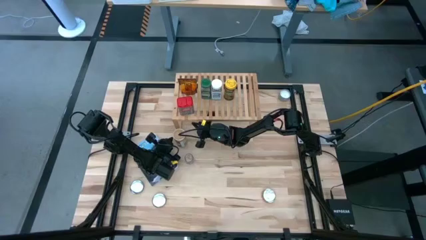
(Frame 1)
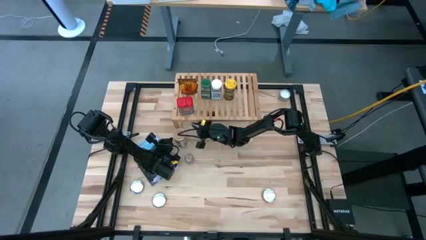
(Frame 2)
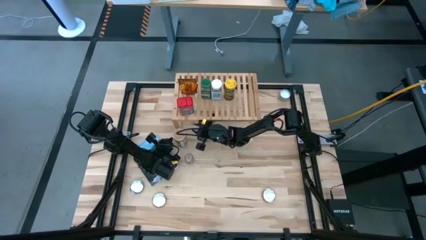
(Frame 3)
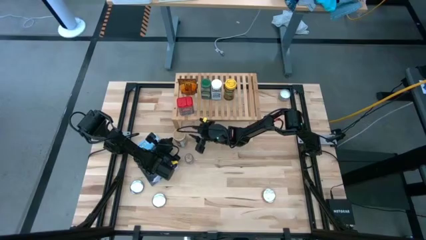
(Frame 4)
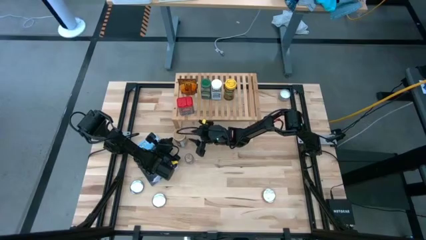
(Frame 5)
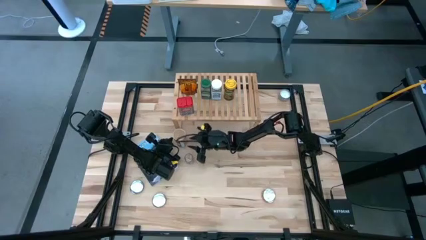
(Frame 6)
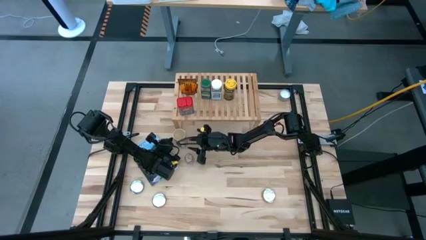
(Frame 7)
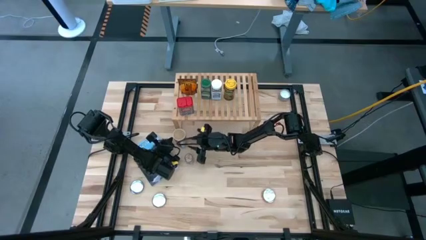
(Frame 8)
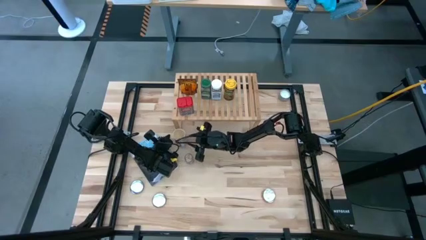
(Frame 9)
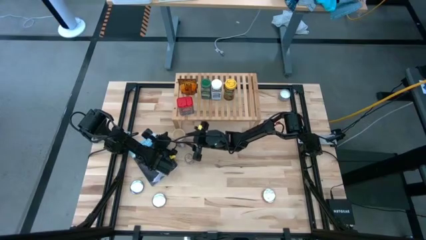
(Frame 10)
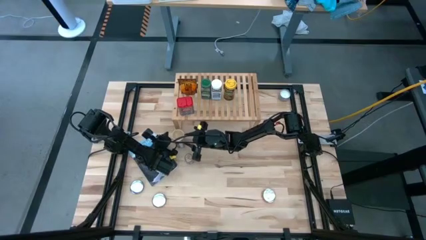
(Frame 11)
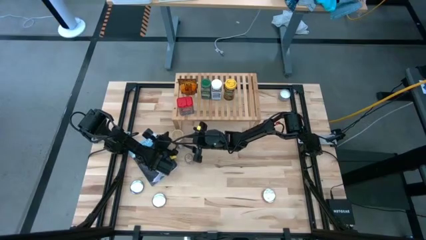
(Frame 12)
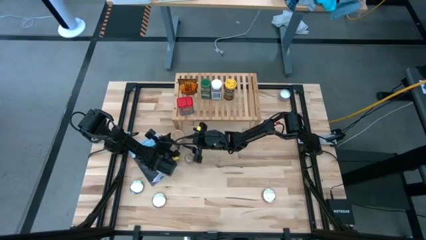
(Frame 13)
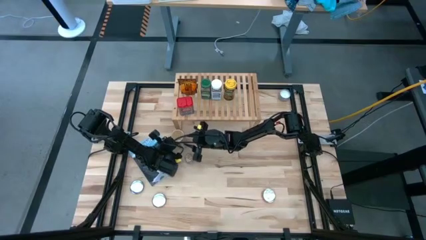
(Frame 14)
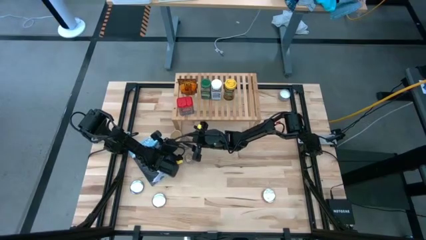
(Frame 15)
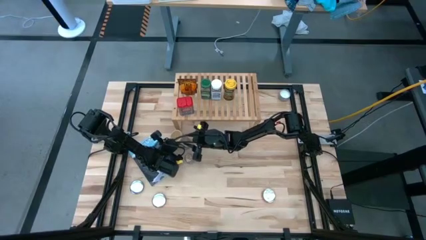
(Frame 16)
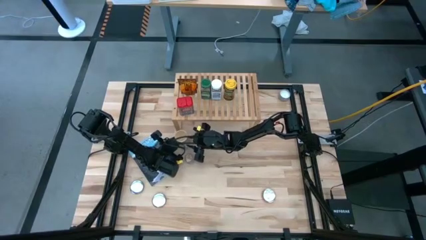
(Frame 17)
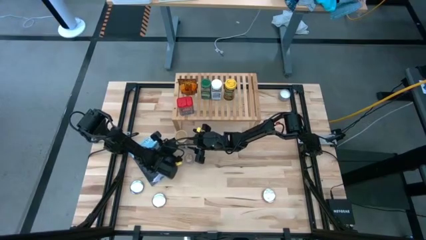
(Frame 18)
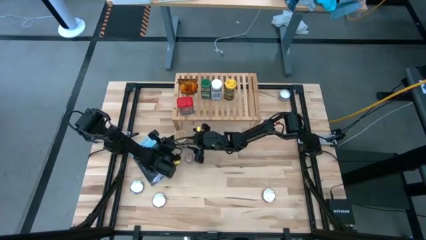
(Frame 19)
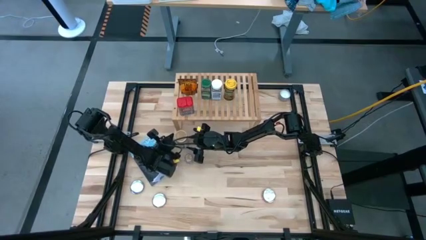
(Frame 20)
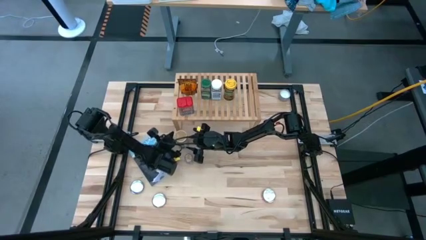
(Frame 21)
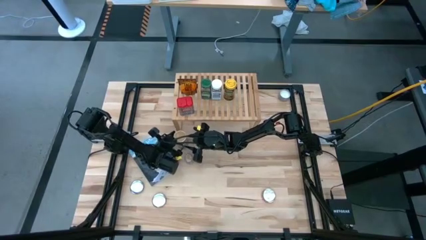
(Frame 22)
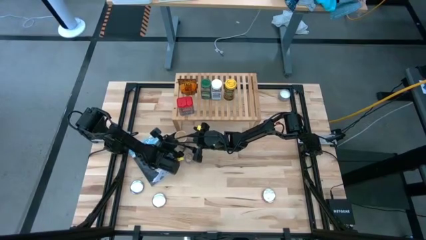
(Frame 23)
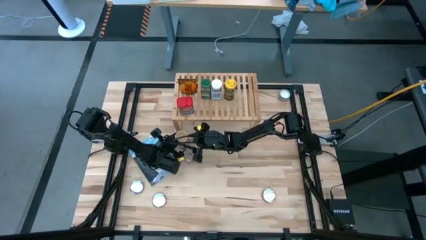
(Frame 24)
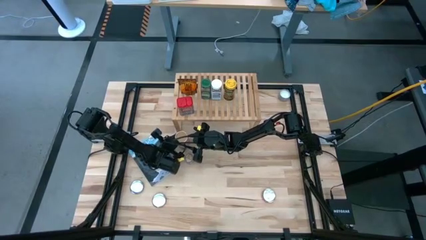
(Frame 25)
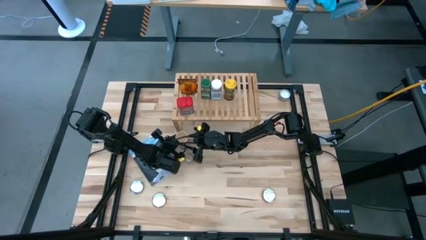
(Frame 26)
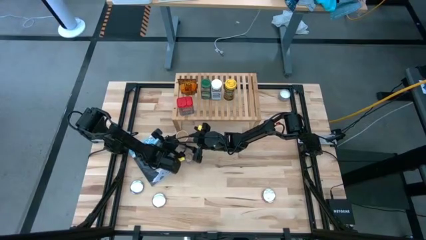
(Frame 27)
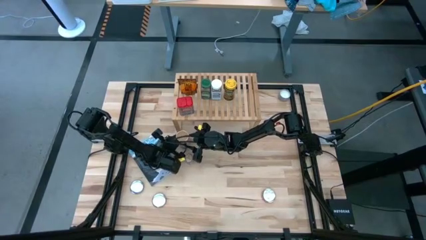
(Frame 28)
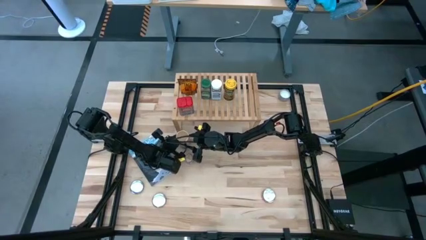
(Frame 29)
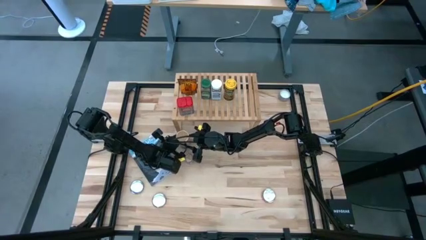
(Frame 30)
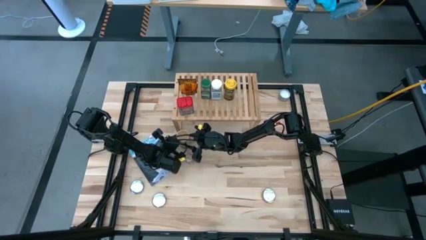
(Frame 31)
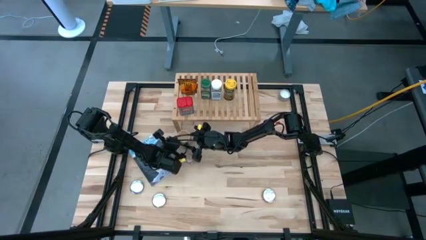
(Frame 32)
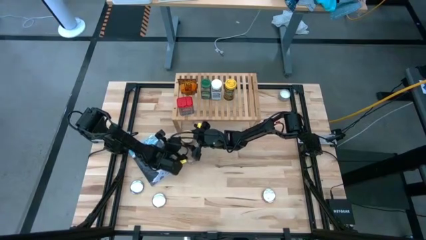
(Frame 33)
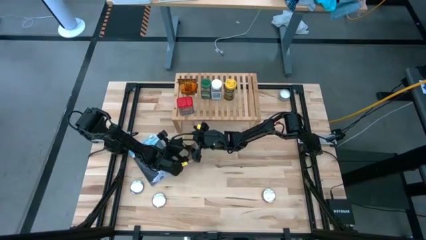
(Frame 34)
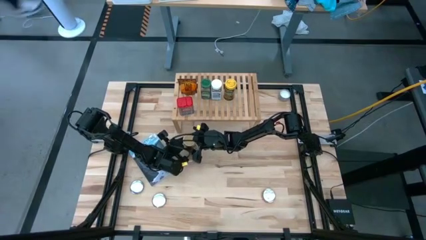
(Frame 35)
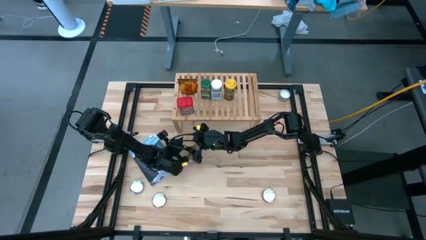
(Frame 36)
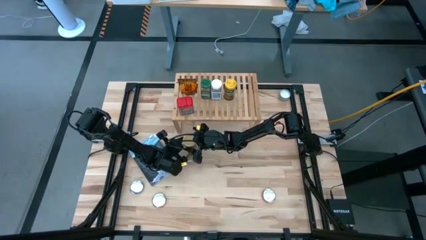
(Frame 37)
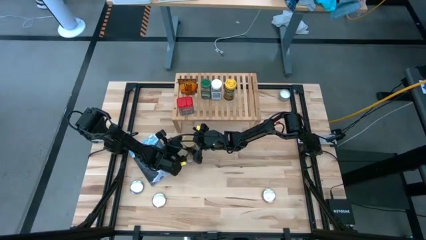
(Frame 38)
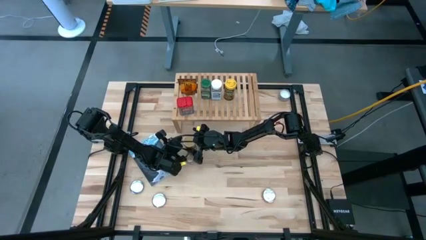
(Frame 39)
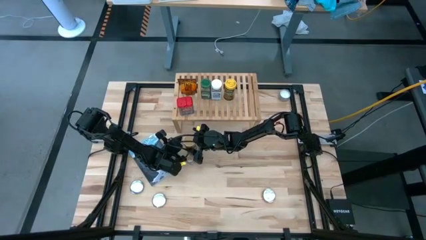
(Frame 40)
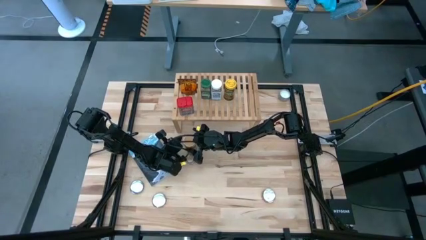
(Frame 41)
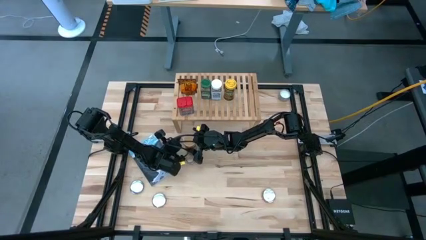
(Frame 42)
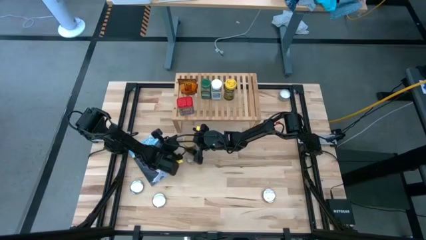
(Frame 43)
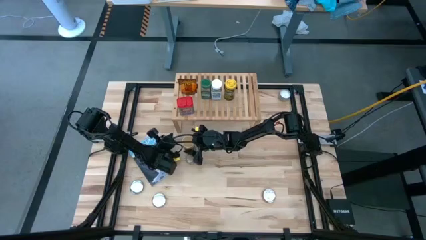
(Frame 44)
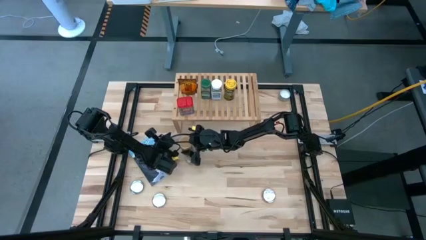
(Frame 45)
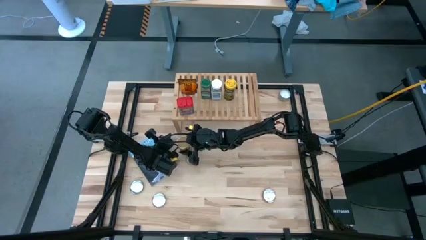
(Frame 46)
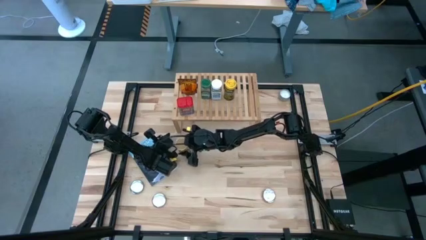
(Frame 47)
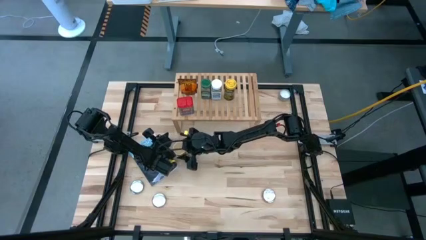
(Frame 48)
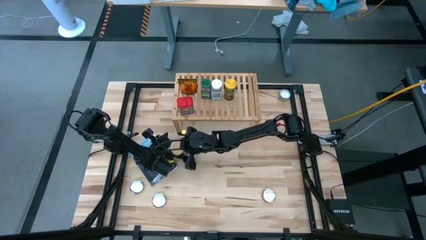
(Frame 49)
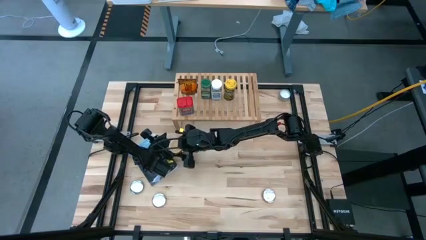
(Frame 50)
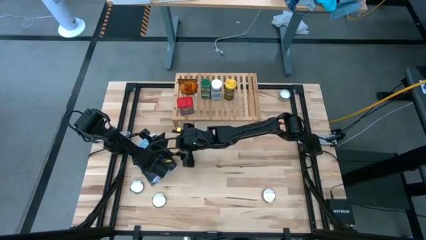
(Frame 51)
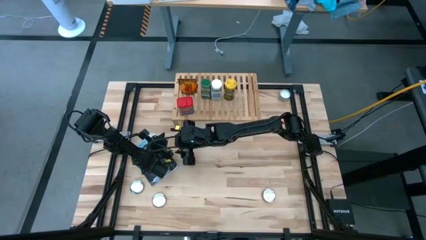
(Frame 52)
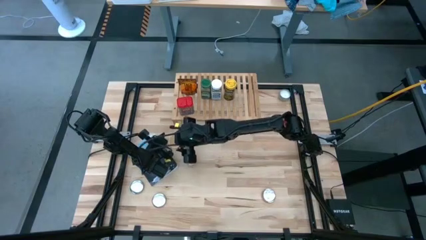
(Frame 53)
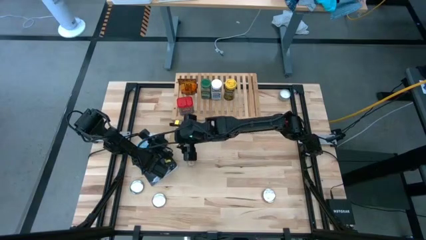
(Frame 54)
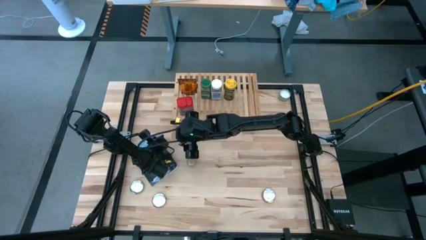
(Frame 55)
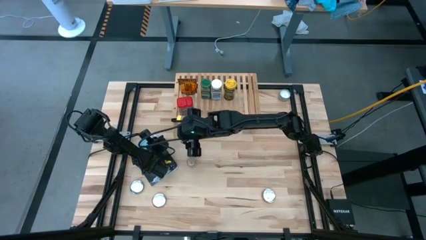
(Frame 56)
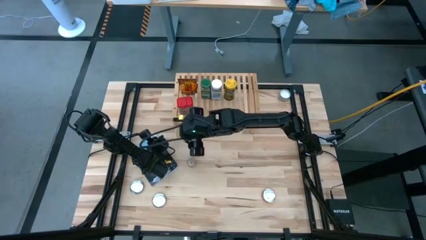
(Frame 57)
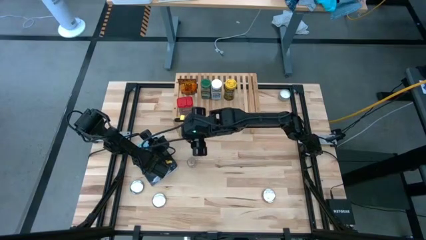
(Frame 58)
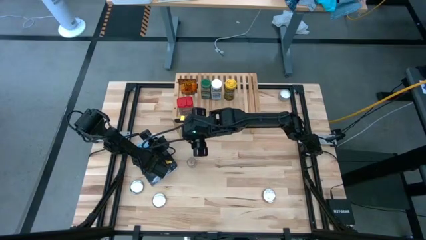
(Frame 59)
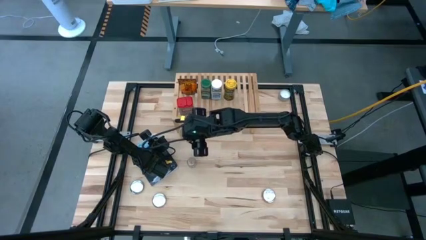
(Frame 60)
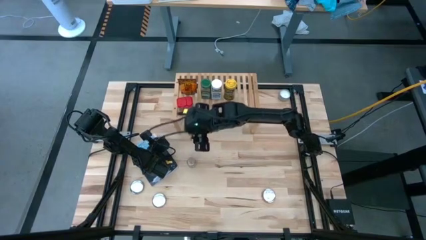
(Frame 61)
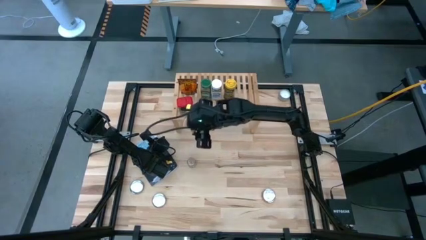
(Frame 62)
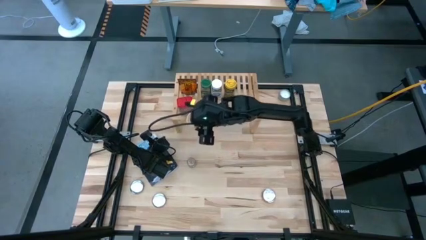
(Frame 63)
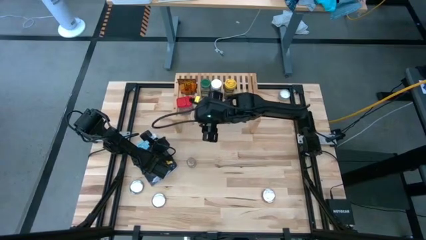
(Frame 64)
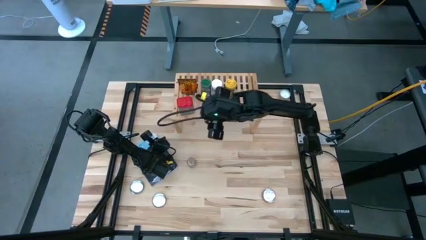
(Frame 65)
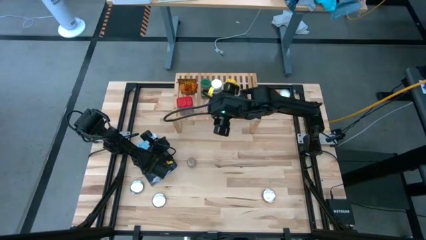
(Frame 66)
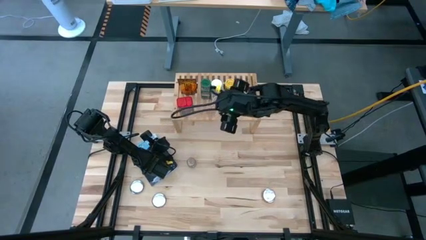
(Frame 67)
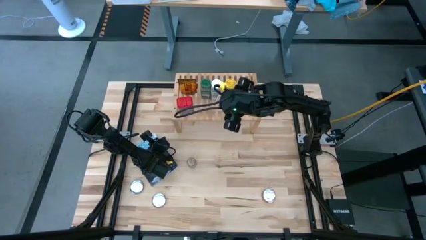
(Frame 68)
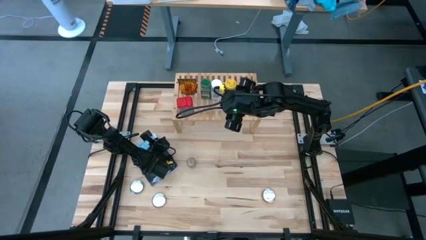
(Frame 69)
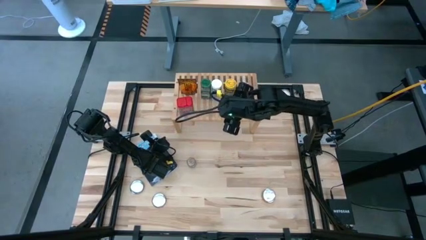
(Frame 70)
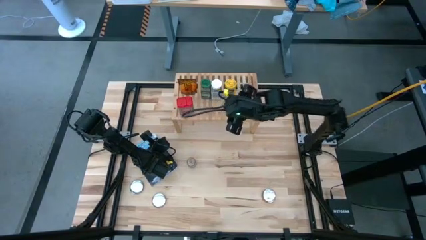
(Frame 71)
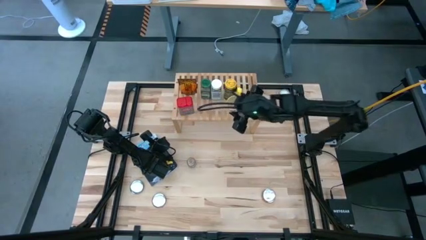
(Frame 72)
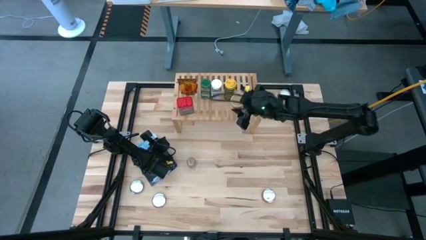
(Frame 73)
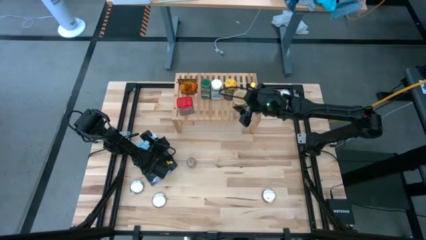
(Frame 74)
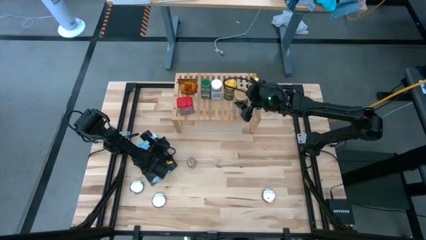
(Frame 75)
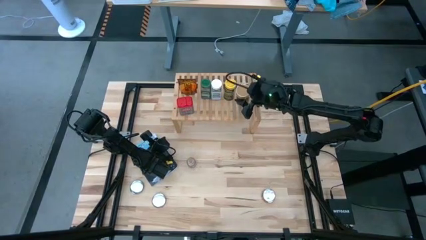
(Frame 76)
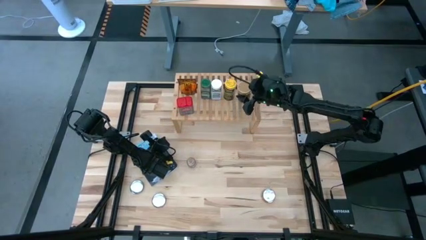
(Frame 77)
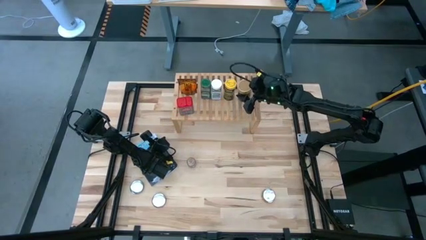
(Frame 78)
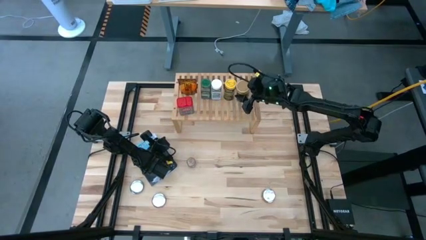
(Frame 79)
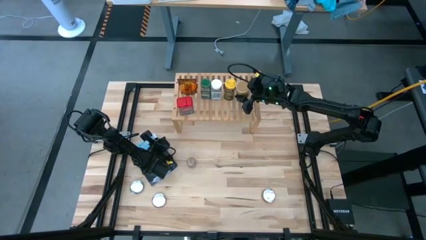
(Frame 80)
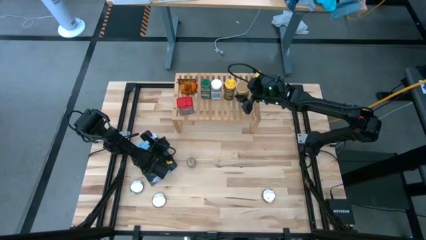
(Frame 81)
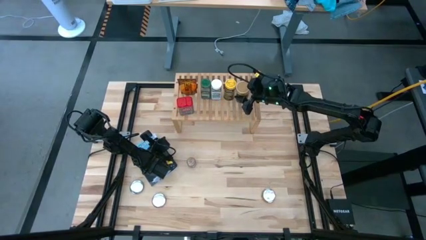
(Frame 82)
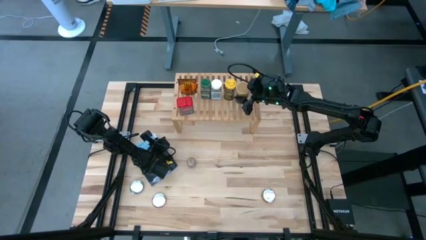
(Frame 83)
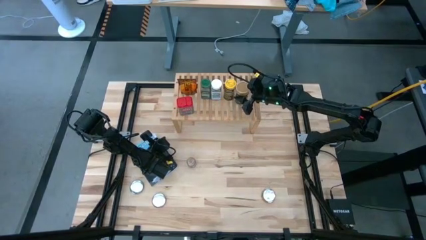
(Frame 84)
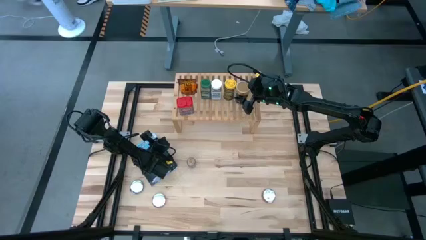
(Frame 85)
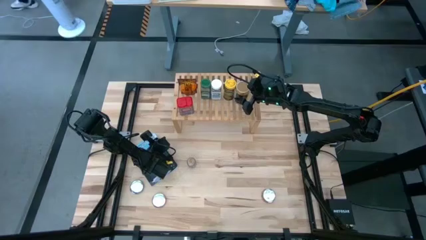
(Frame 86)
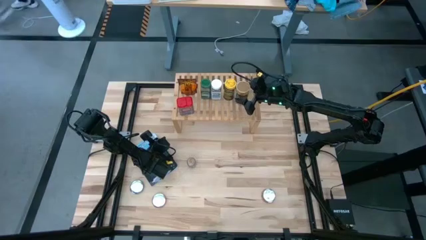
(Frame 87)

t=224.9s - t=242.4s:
Task: Shelf spices
Put the brown seasoning bottle on the shelf
